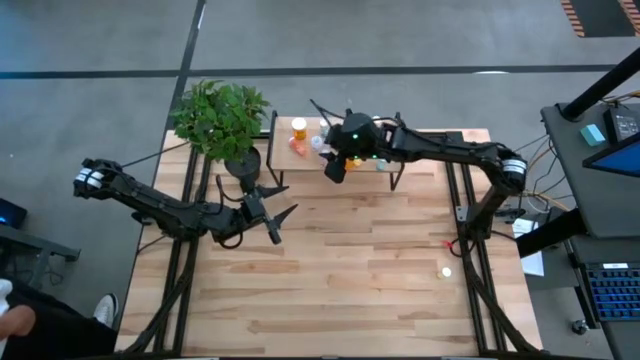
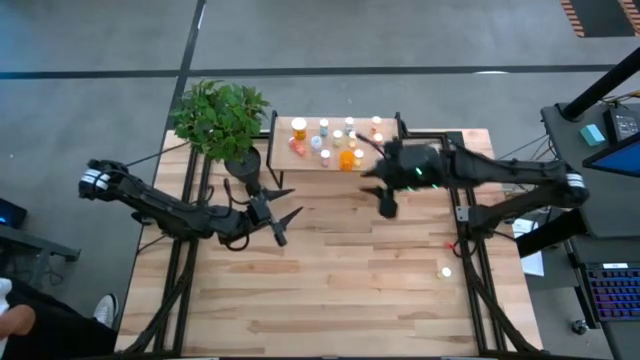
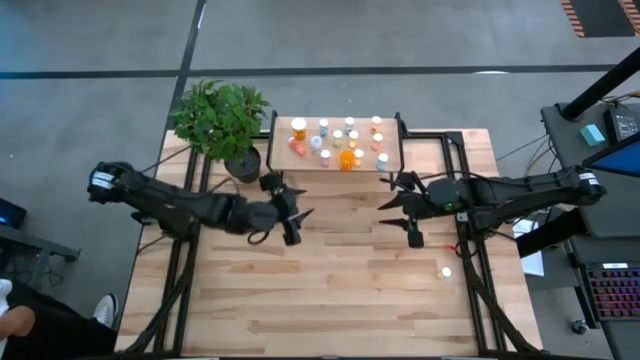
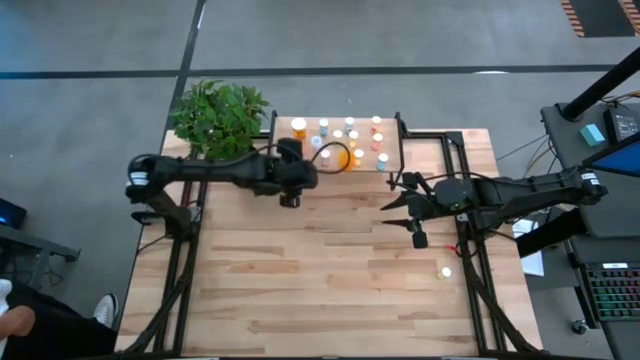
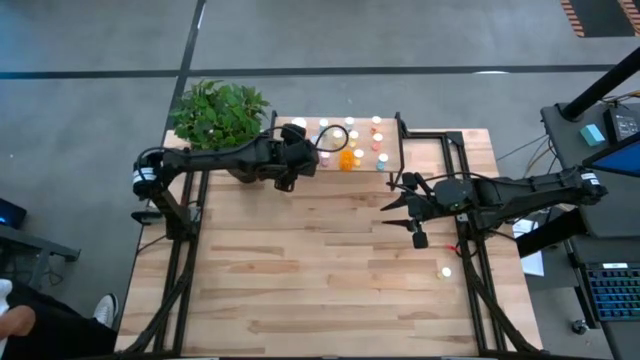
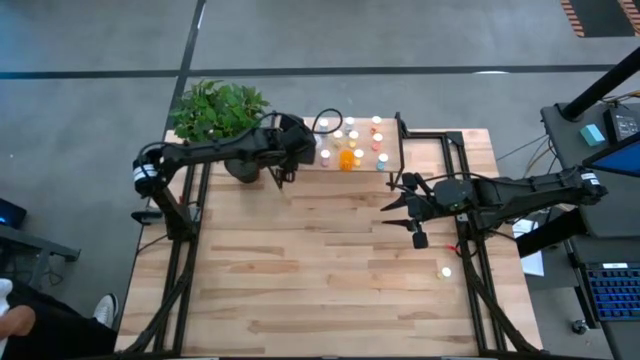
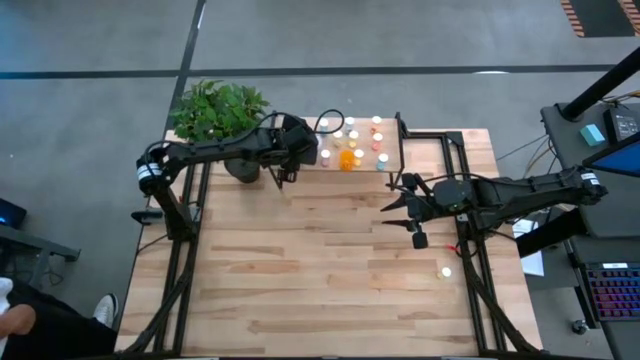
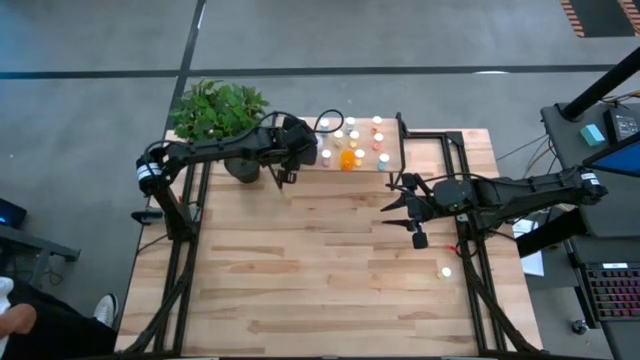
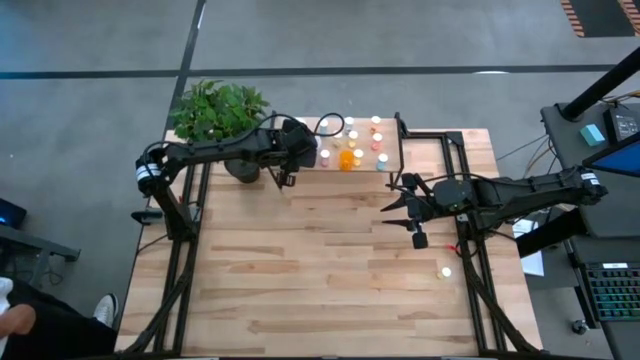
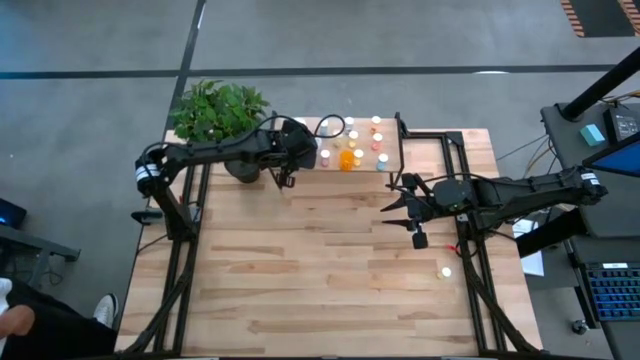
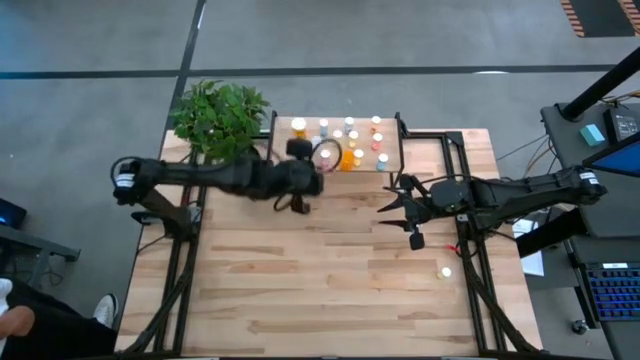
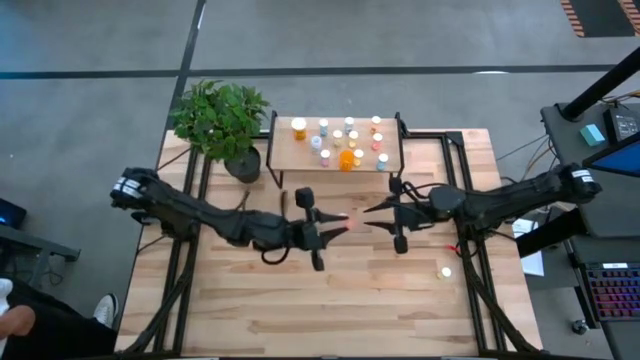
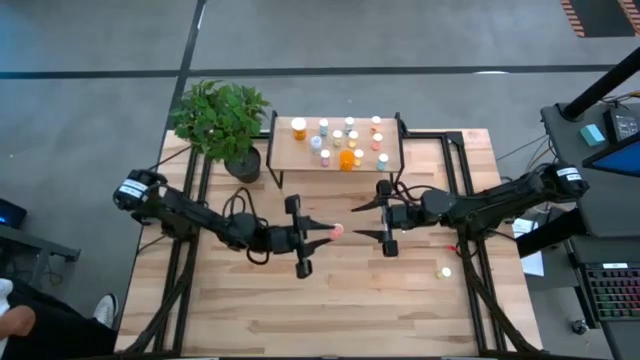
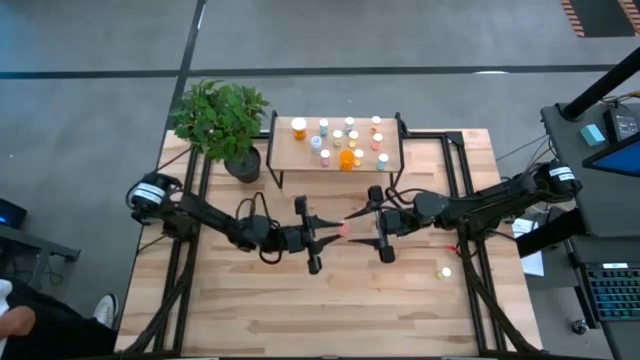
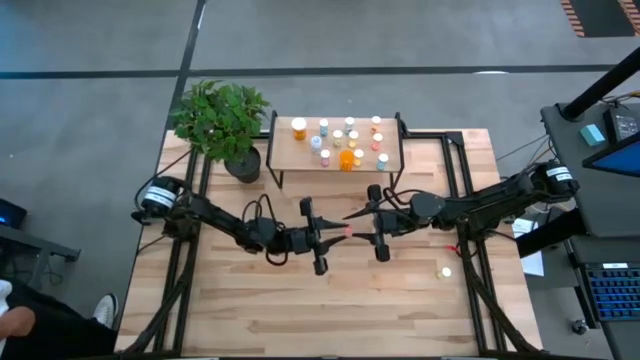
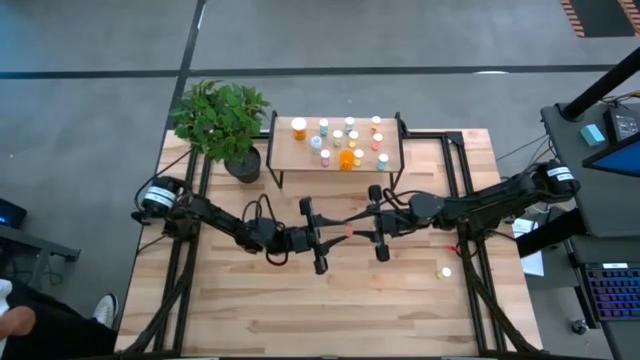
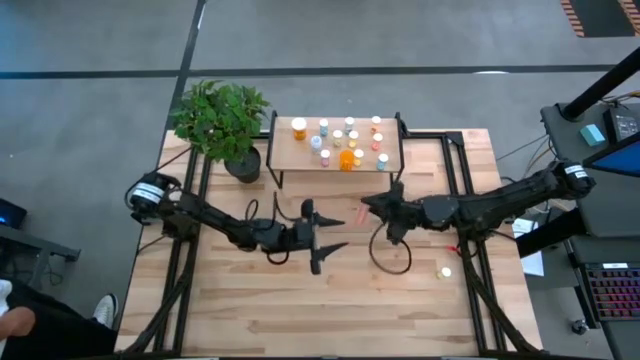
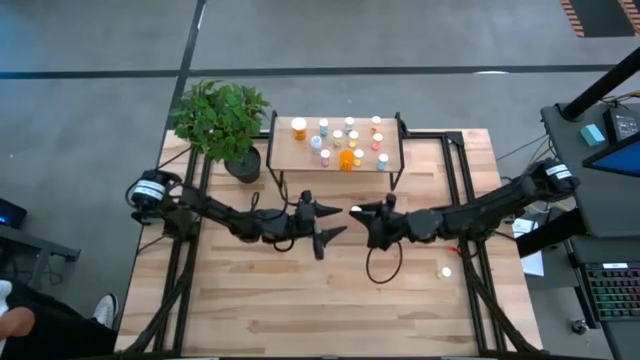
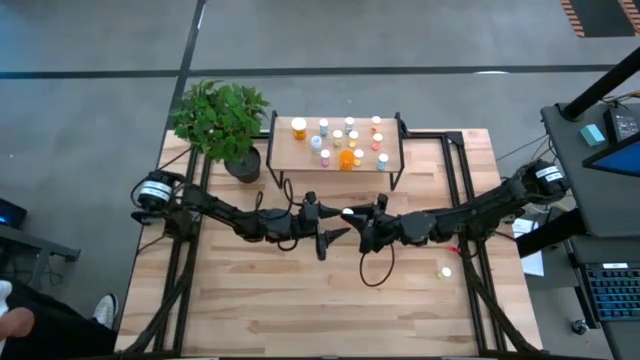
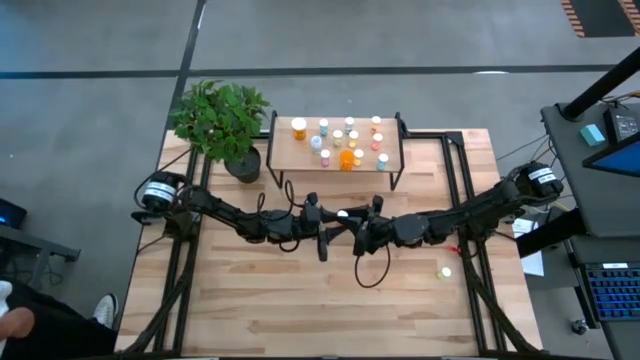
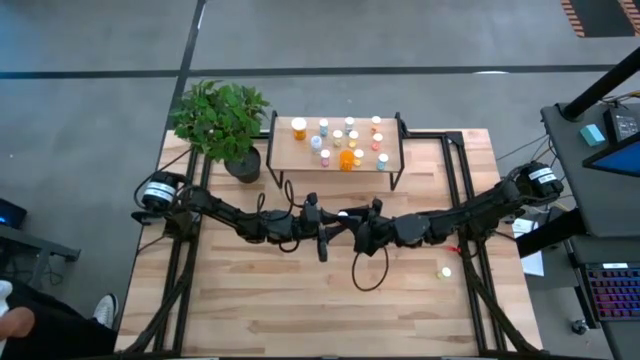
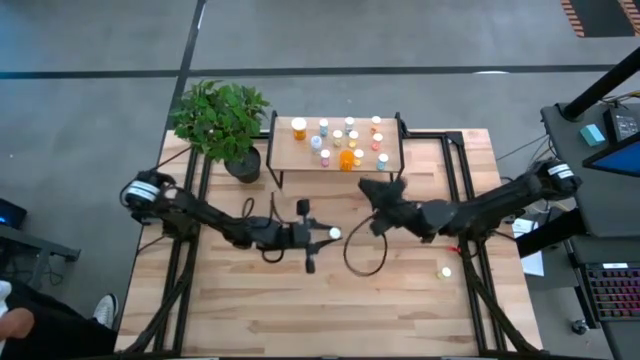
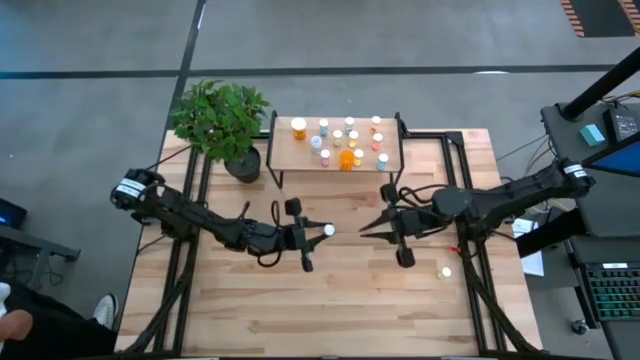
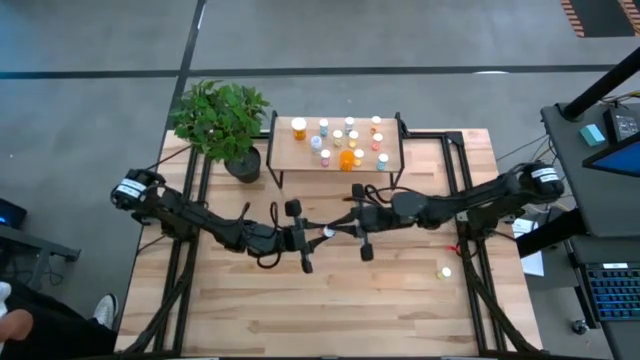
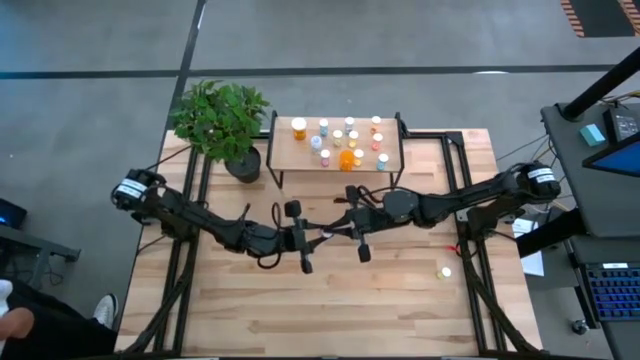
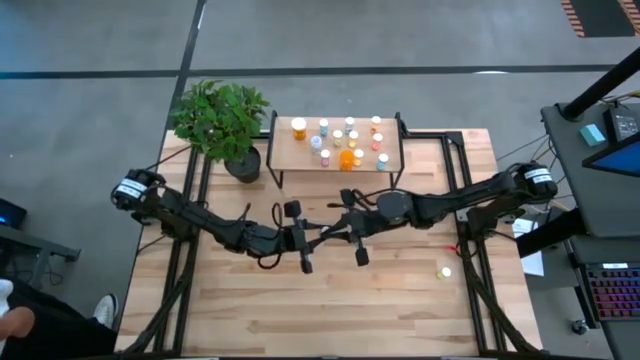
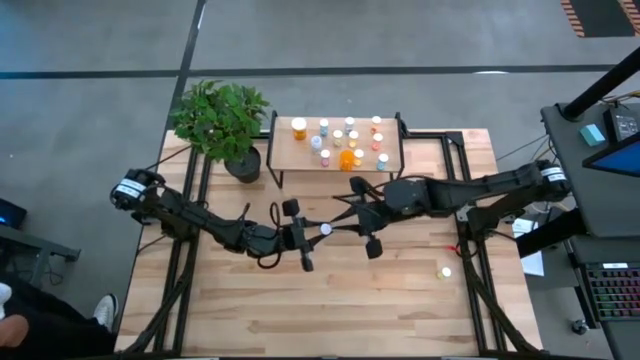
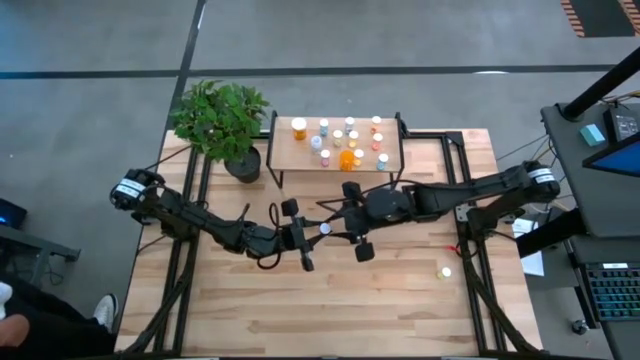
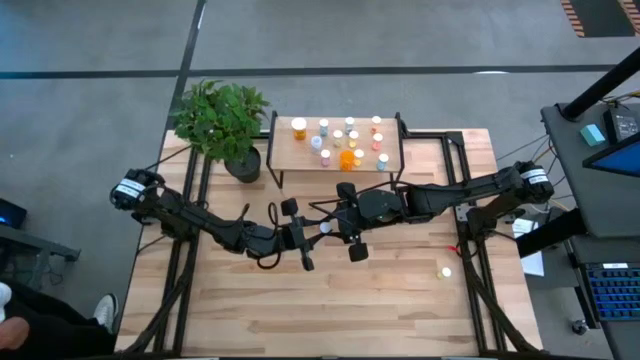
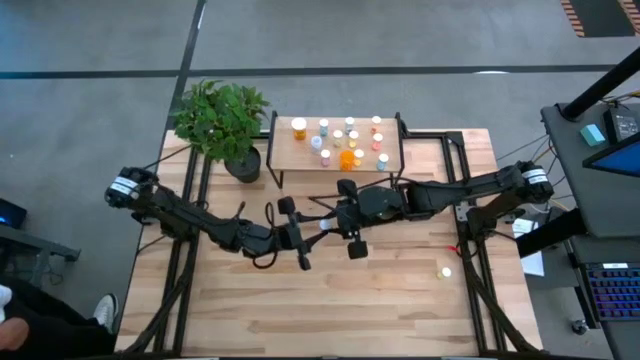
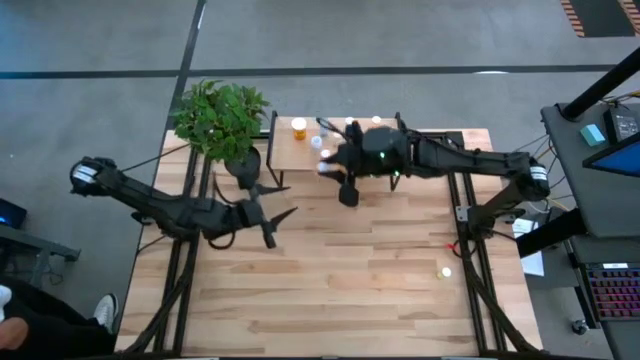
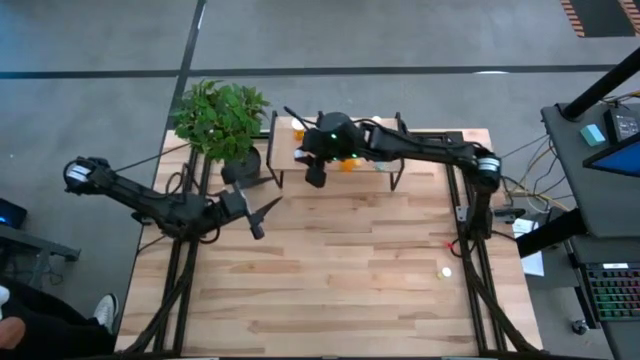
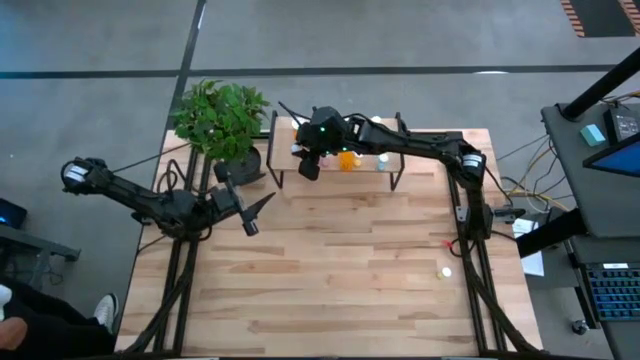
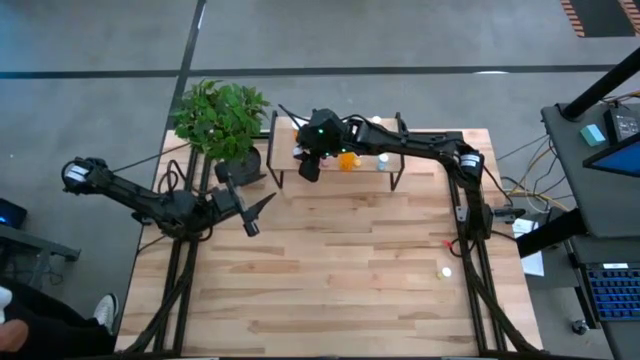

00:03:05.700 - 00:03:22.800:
Task: Pick and place medicine bottles onto shelf by color
Adjust the orange pill bottle on the shelf

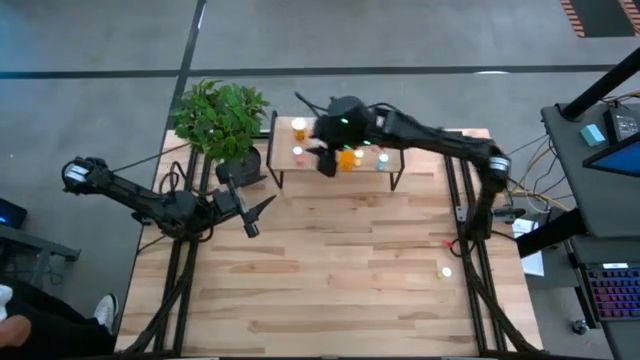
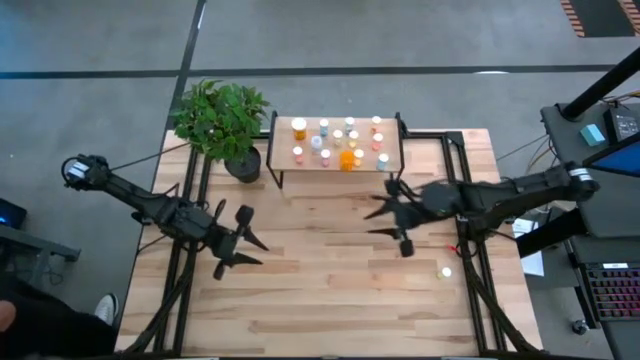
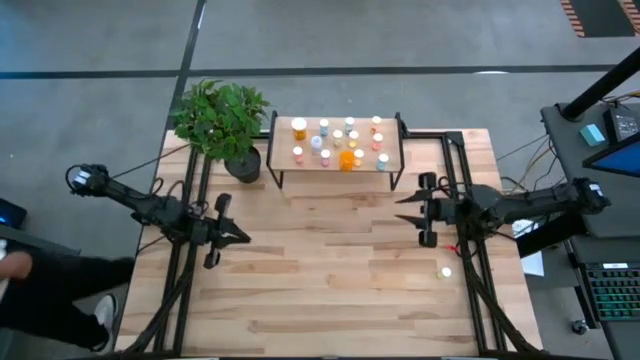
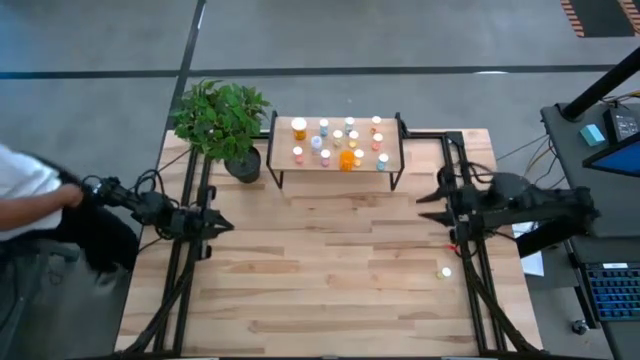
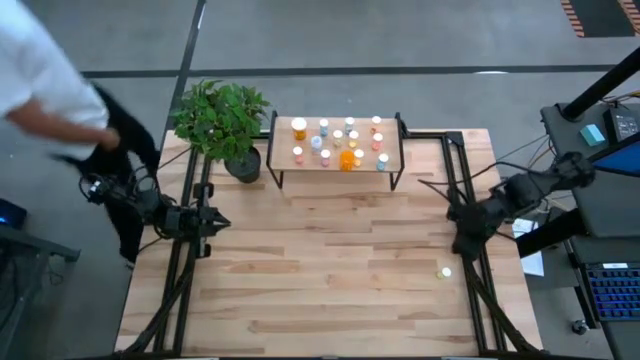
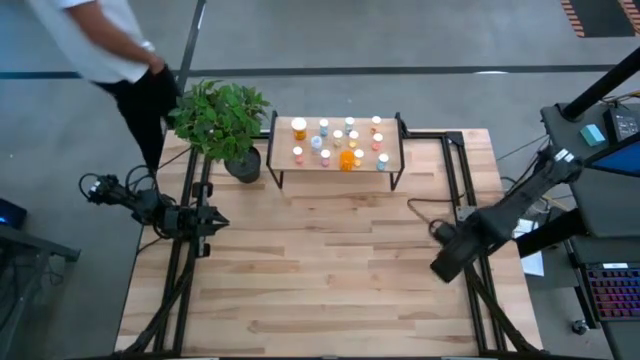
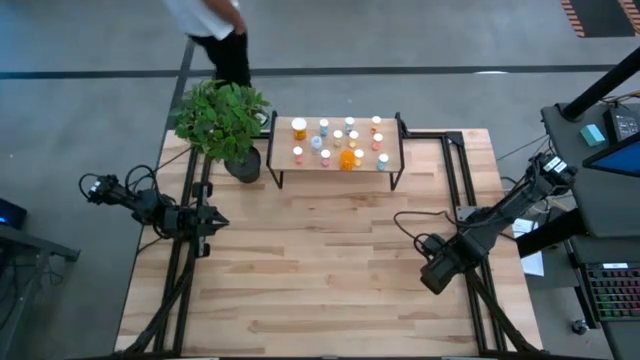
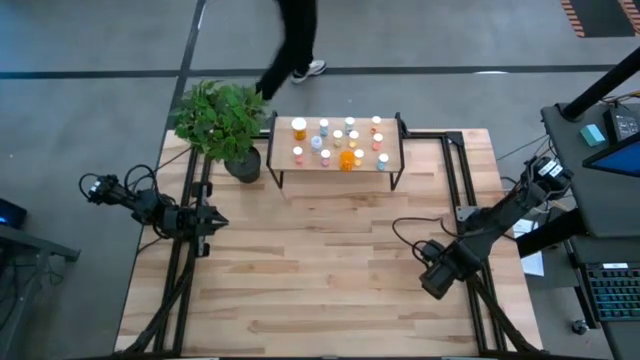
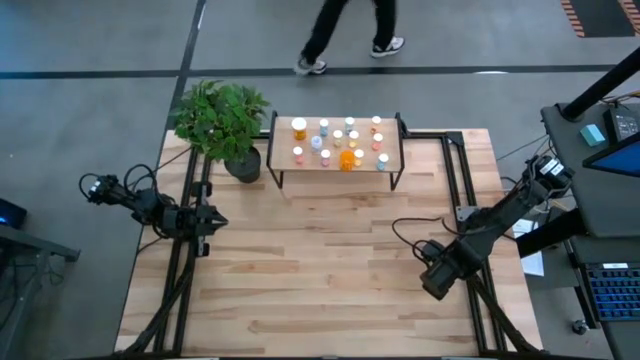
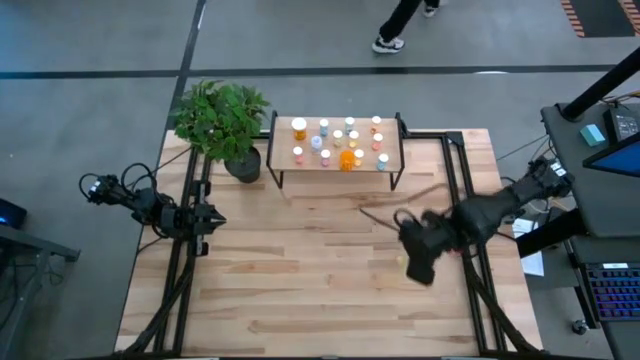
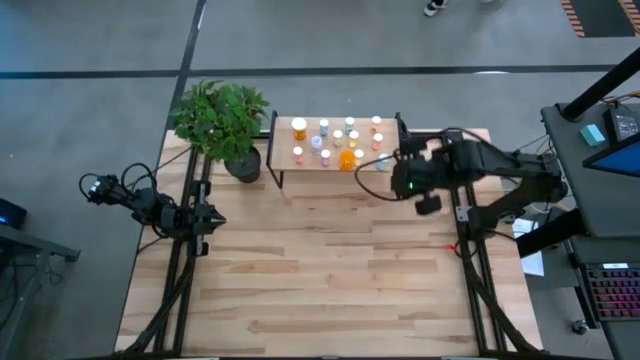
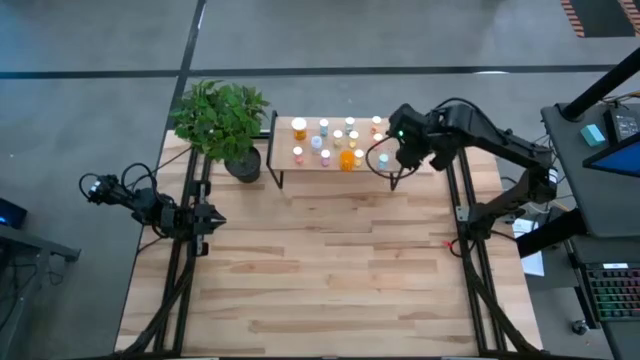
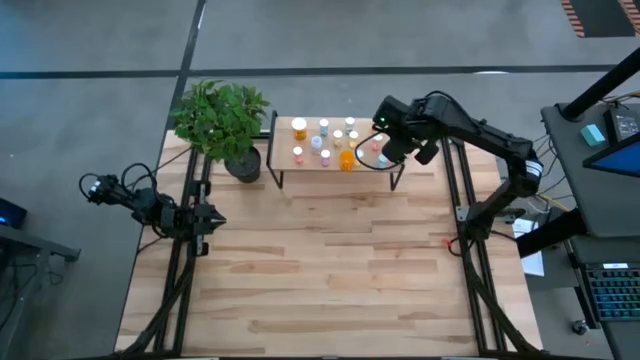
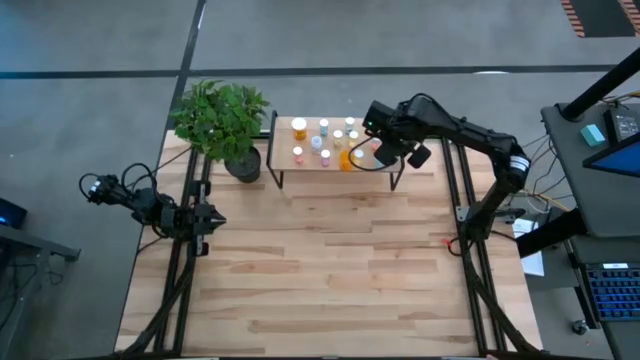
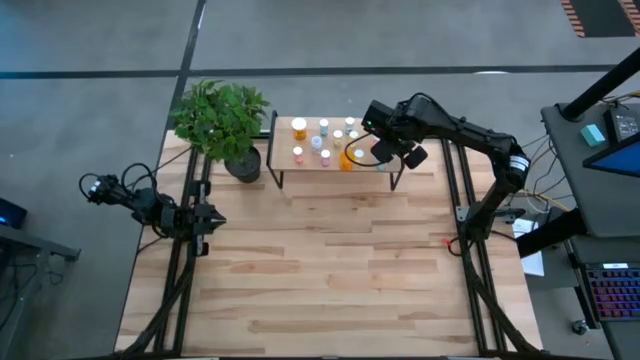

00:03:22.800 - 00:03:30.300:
Put the yellow pill bottle on the shelf
